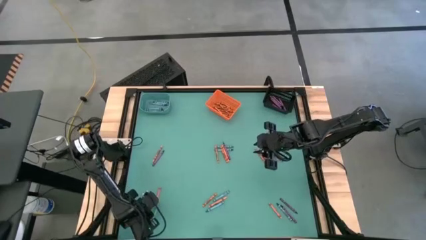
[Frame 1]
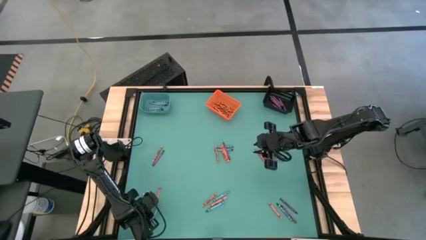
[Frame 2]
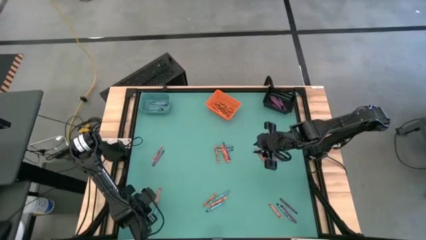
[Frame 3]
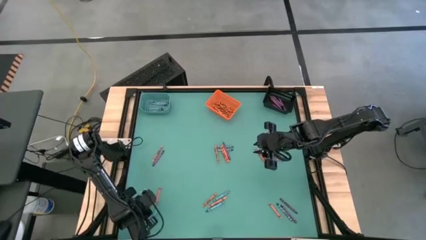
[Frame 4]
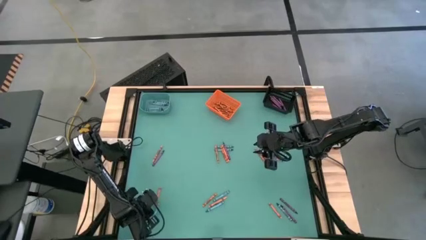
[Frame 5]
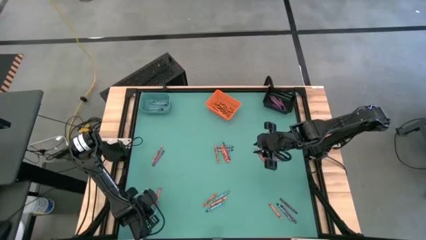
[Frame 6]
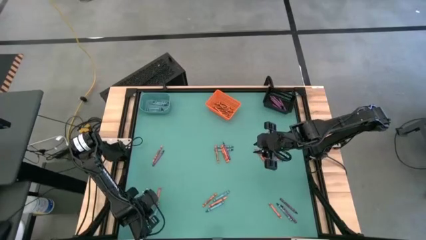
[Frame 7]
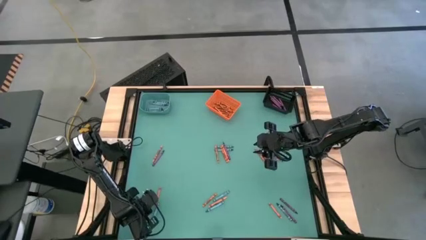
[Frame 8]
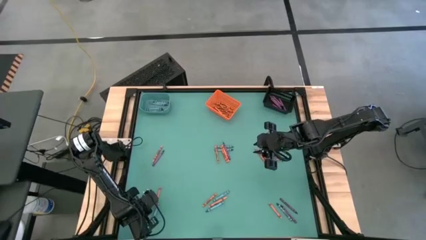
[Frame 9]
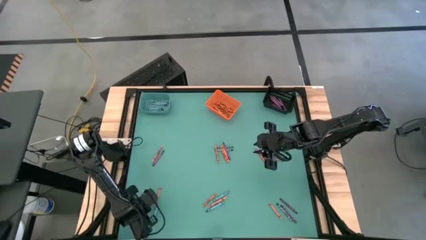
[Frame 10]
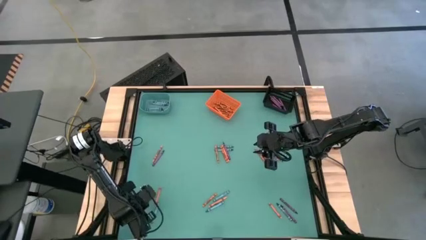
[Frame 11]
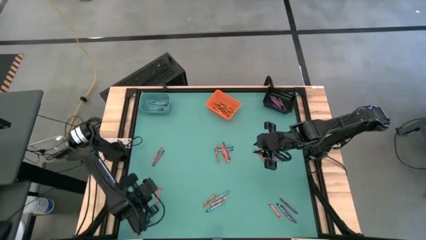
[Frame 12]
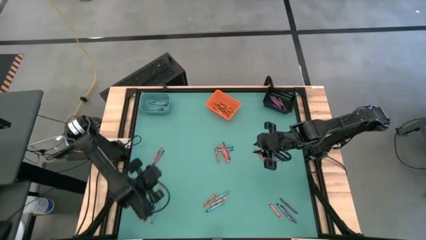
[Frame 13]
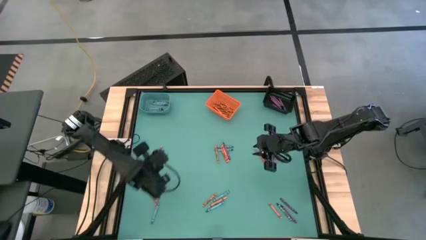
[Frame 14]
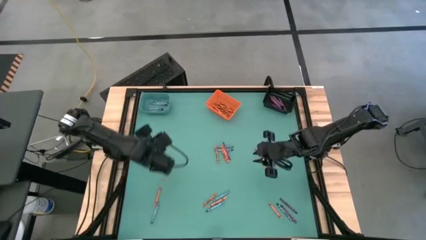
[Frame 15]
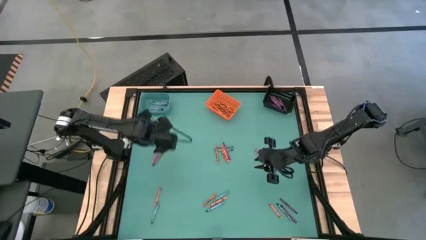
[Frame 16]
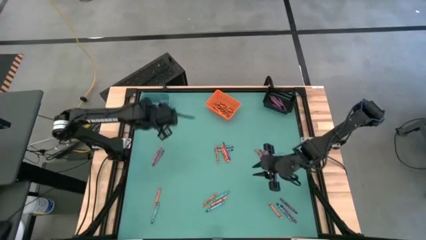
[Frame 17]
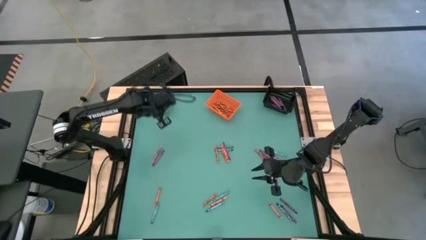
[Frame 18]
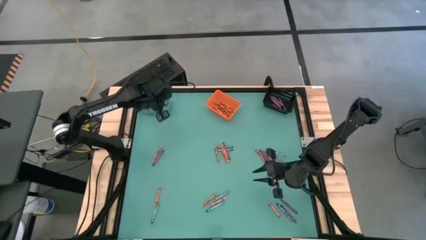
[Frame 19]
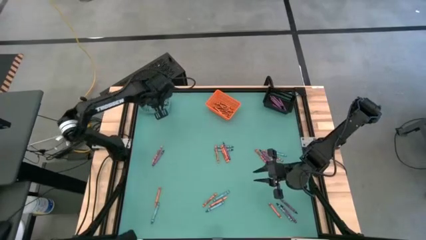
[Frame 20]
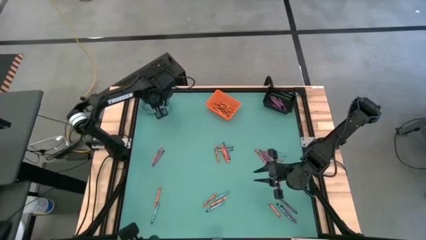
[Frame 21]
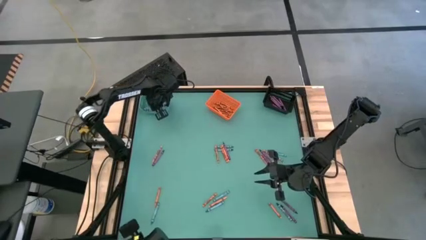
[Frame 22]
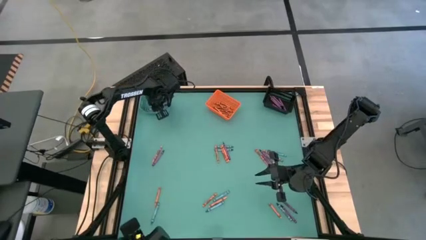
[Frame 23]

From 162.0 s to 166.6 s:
Task: Sort crayons
Put the blue crayon into the blue bin

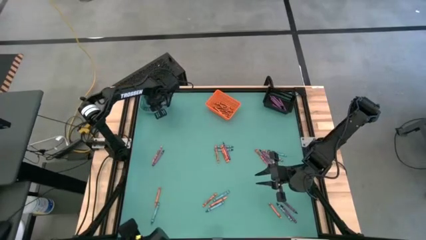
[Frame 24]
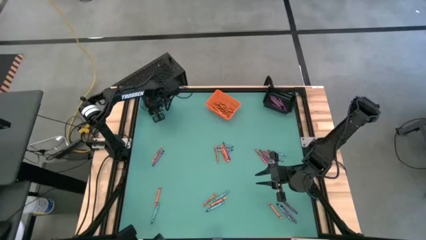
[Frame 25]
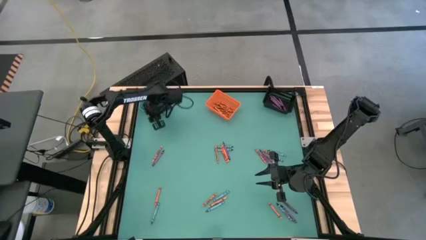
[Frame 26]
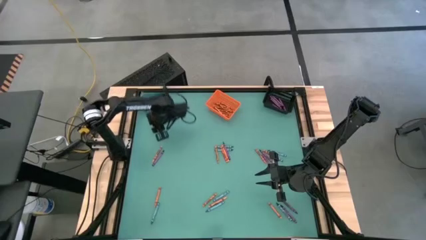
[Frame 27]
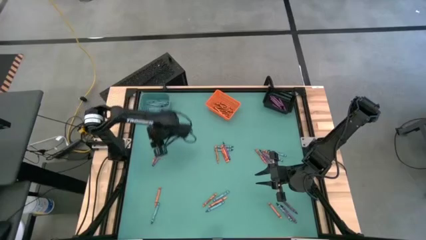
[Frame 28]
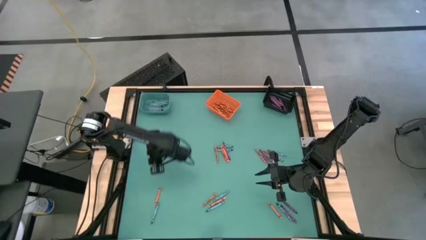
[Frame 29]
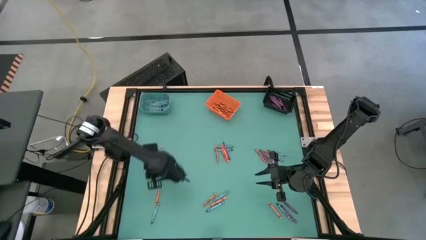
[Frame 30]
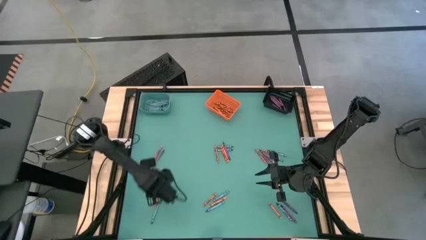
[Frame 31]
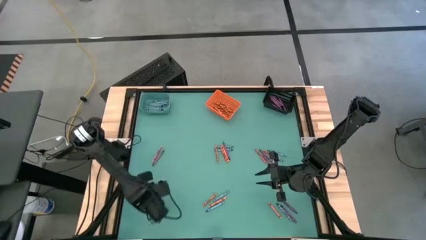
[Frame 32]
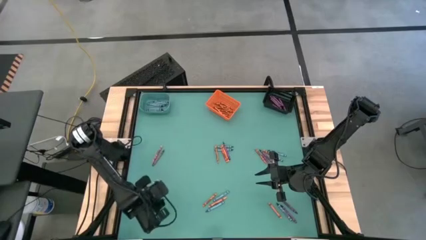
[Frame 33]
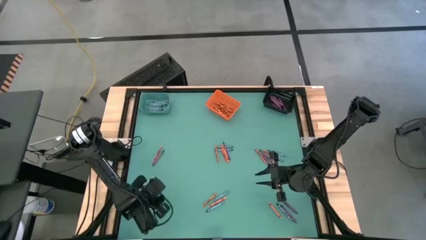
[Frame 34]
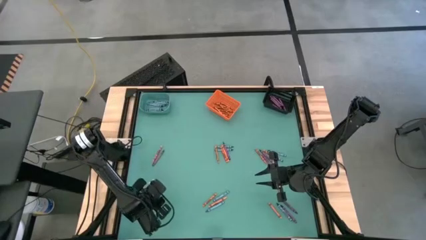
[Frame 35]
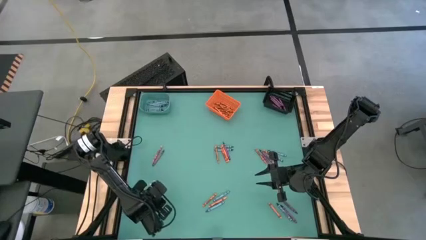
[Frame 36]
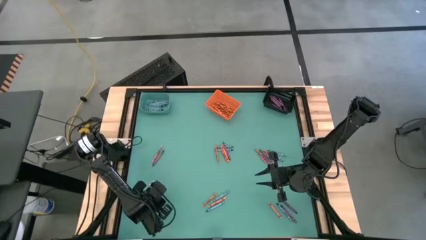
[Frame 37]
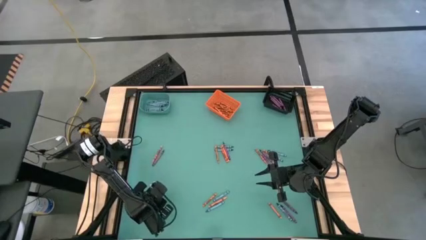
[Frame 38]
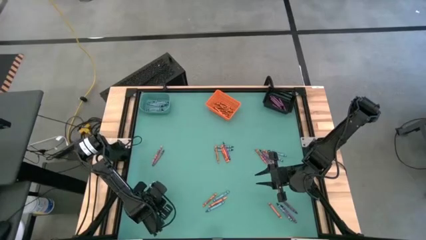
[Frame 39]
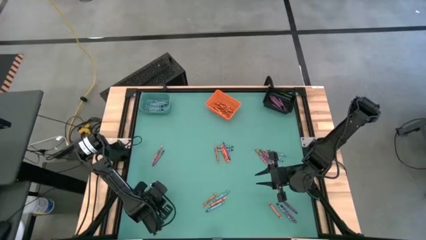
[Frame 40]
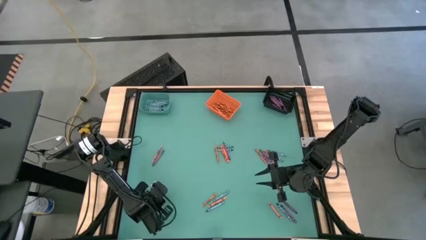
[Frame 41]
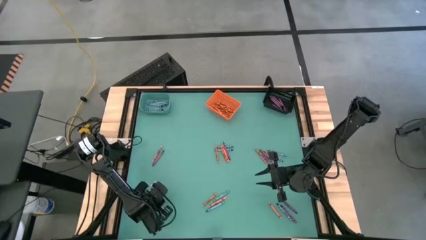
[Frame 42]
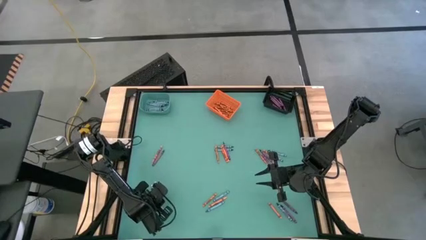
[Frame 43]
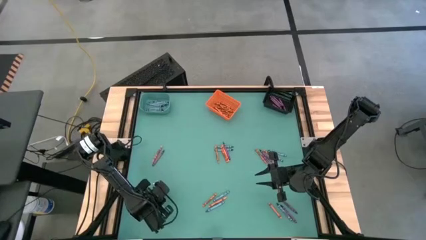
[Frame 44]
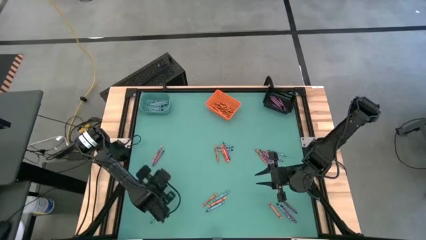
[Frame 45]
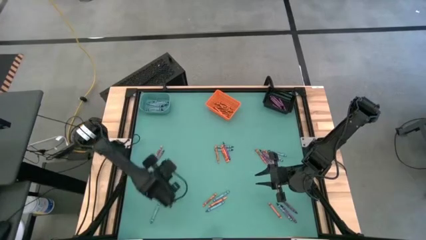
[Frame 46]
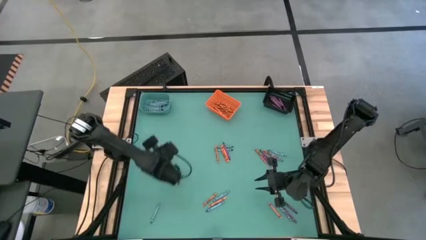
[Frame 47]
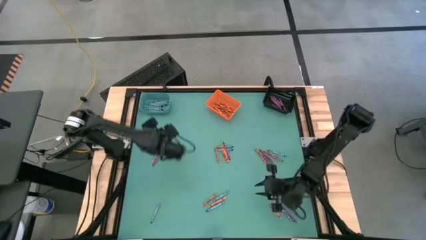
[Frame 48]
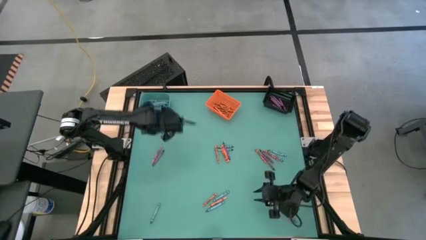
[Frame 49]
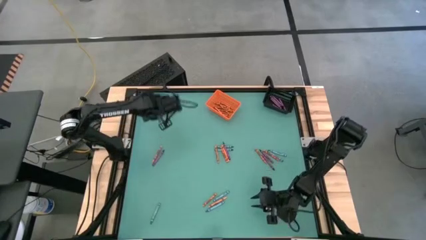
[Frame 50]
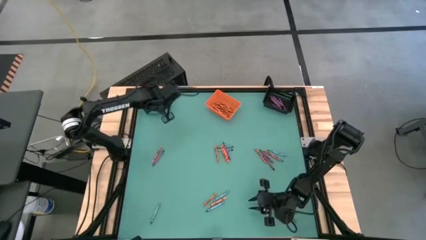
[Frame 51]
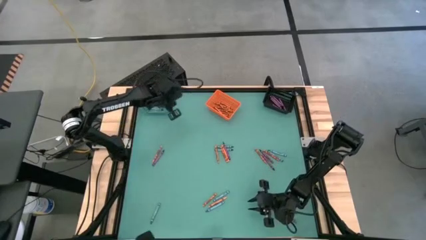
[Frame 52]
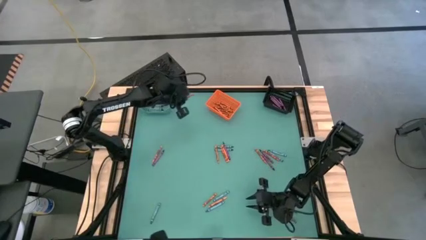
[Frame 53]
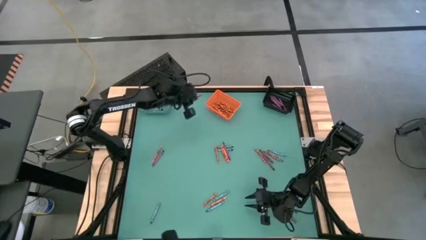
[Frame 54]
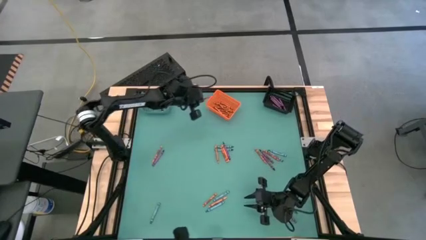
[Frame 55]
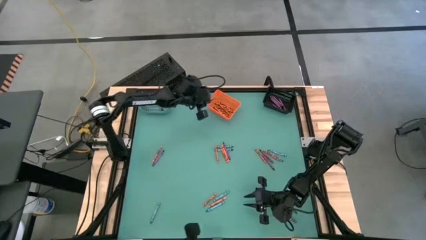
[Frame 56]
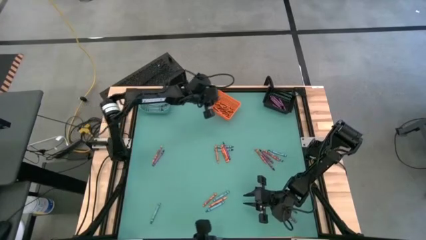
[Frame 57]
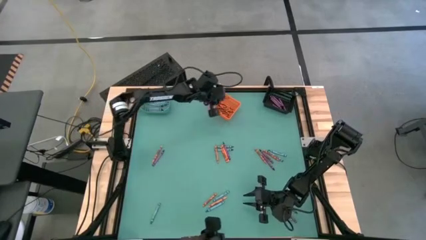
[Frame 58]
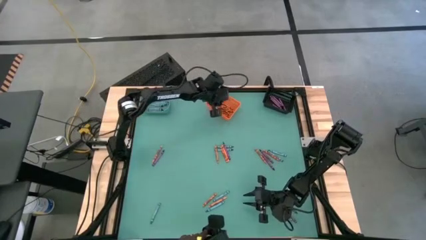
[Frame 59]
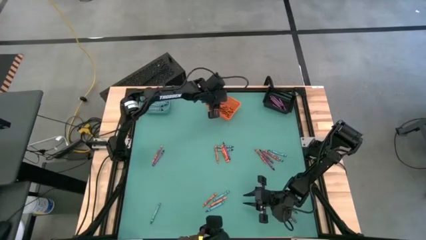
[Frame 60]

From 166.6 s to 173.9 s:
Put the orange crayon into the orange bin

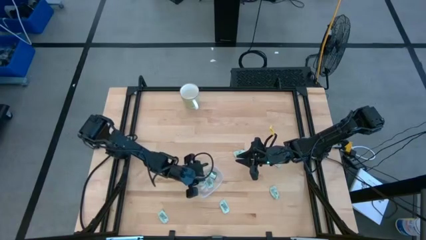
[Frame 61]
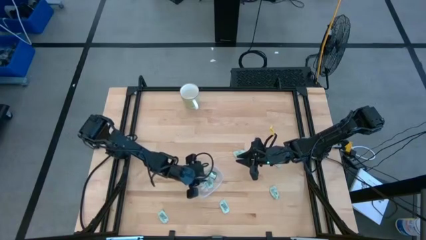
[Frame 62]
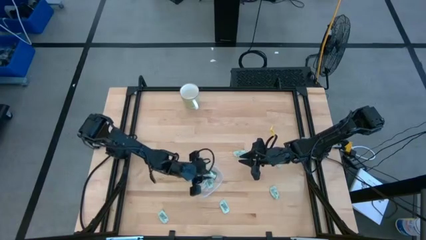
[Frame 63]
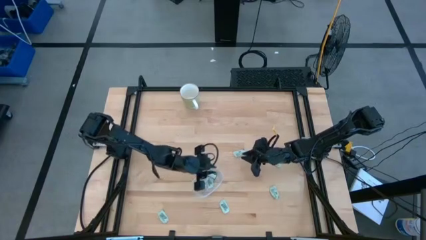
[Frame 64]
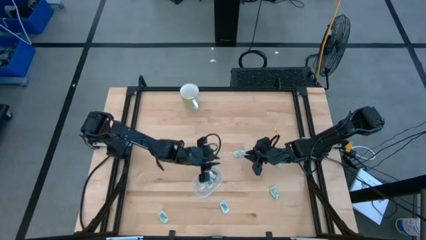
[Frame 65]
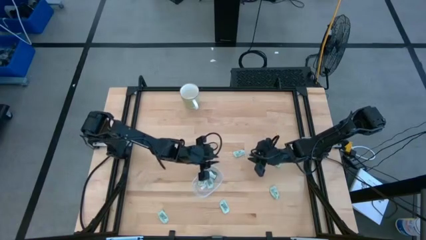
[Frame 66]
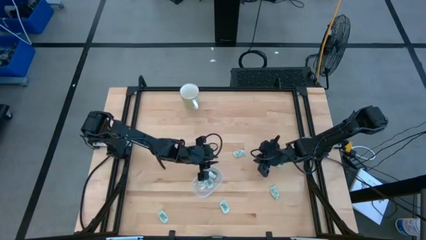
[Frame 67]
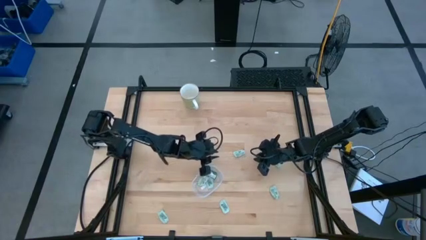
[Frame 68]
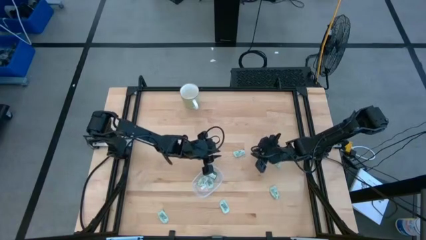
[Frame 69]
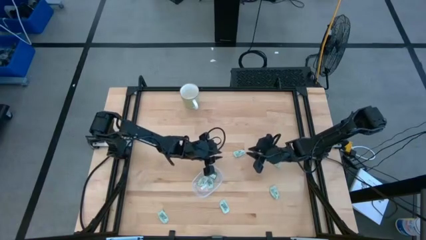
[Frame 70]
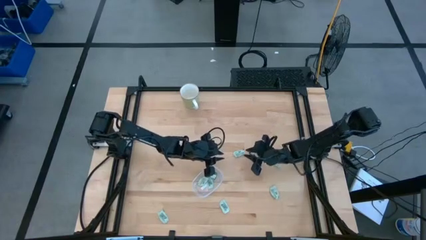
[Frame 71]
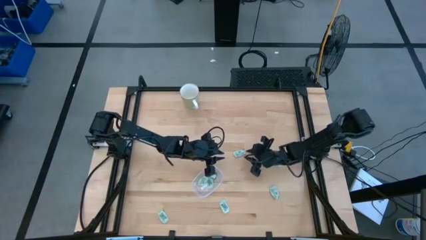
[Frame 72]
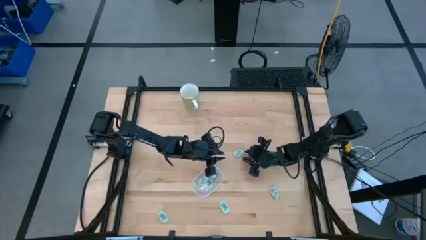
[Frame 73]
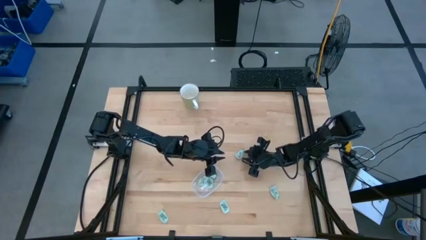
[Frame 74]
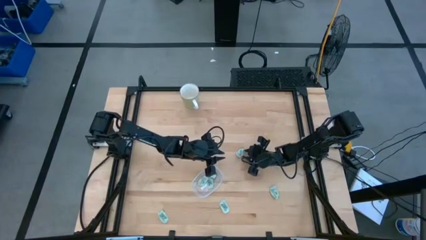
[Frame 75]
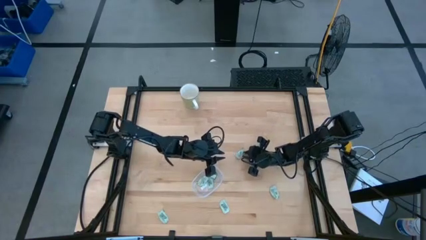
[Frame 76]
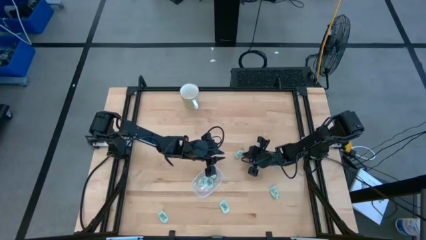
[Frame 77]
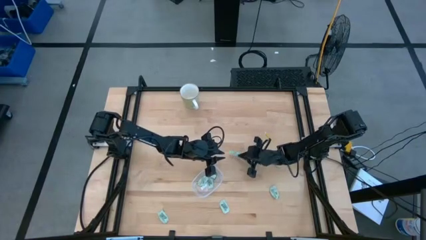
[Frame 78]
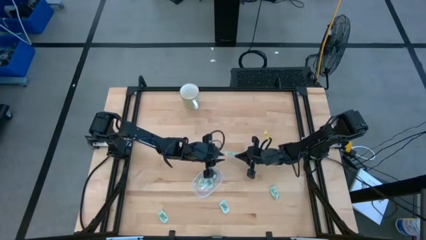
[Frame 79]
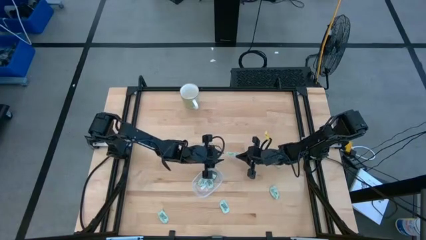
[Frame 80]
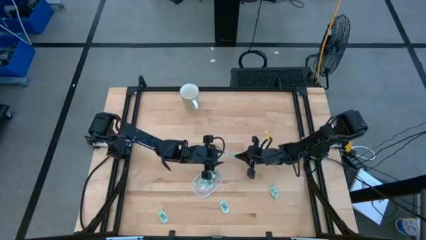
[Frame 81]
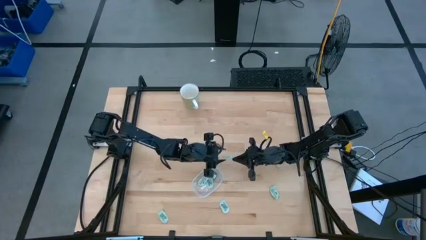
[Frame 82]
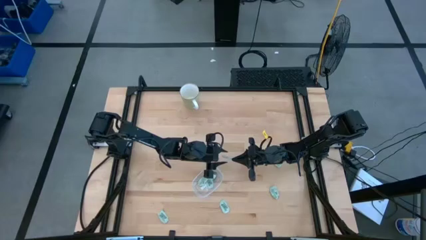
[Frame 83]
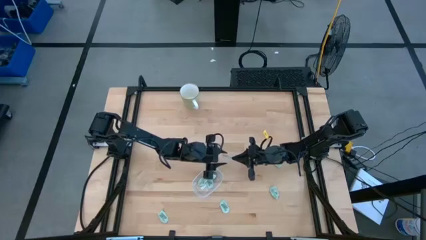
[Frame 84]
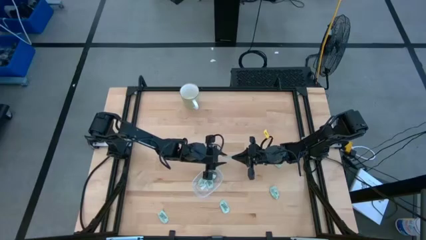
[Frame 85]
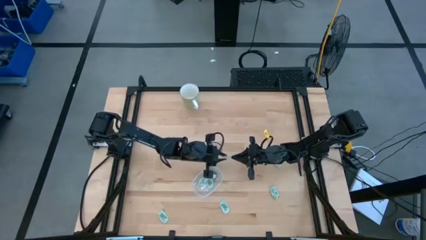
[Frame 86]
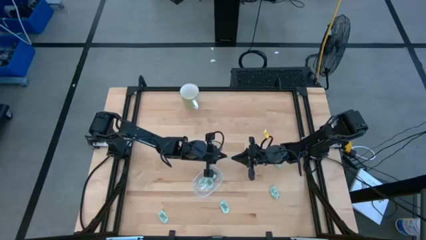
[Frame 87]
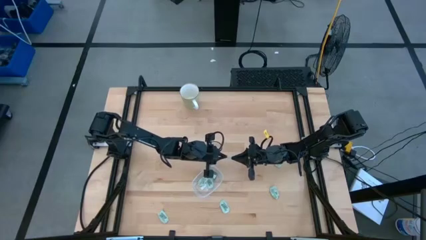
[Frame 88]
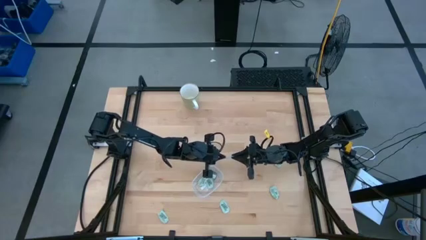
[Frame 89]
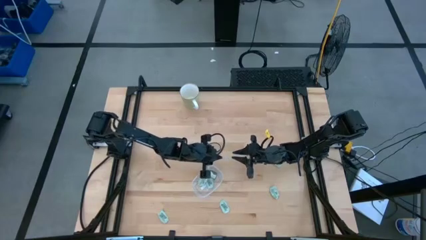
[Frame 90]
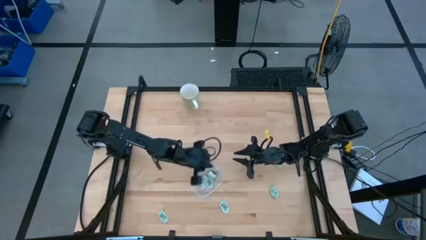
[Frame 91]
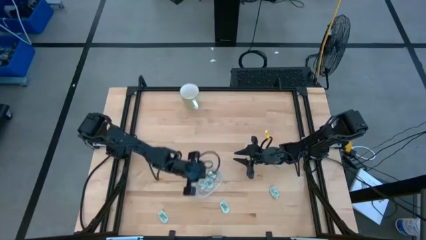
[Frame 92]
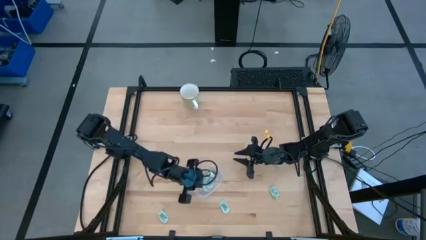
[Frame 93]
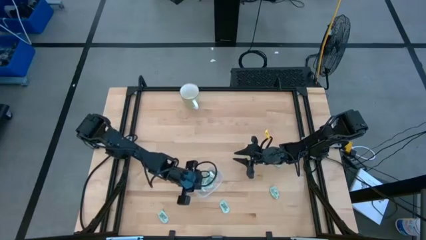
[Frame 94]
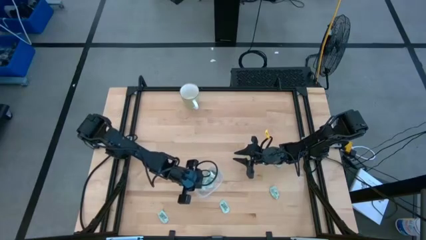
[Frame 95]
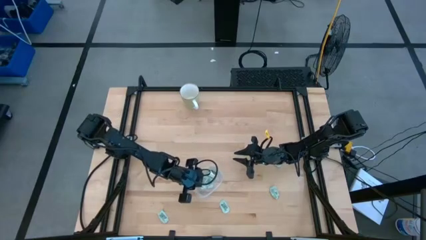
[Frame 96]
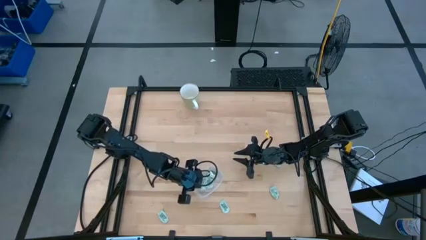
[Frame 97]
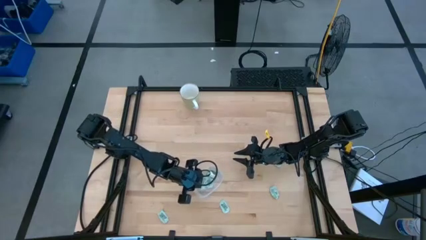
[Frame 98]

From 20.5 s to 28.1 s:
Task: Pick and place Stevia / Truvia into bins
Put the light green stevia packet into the transparent bin
